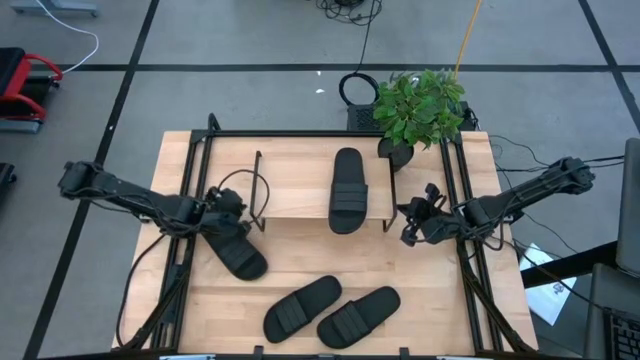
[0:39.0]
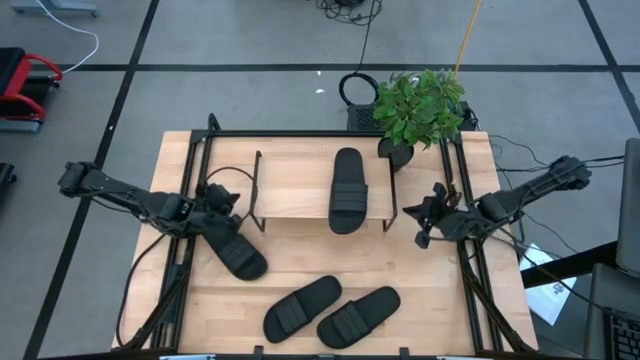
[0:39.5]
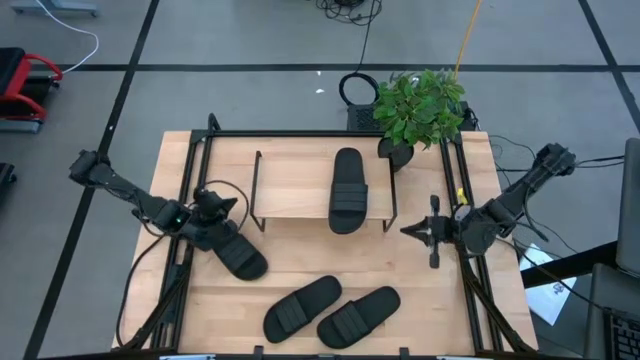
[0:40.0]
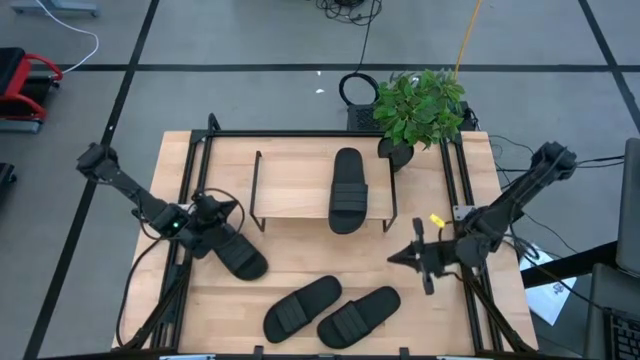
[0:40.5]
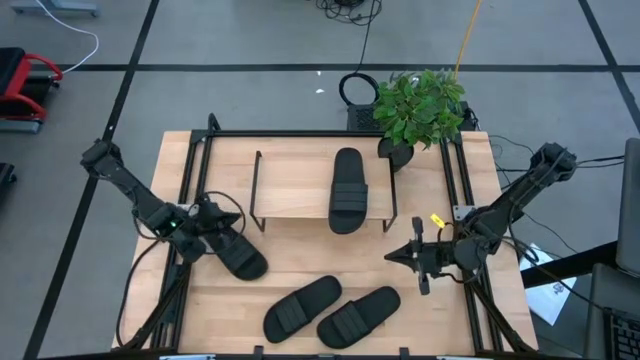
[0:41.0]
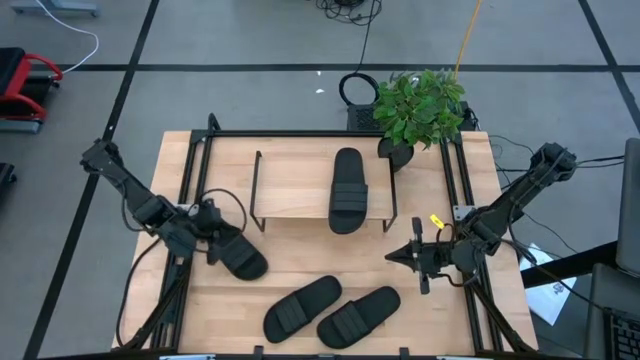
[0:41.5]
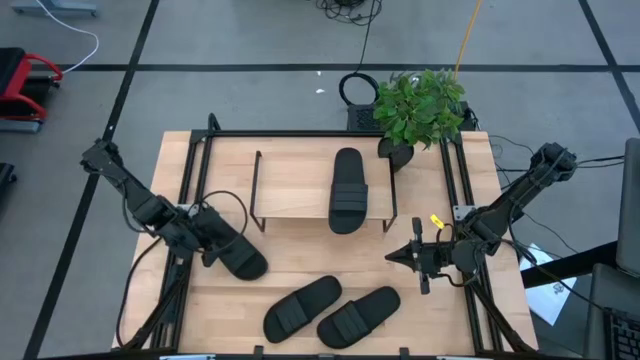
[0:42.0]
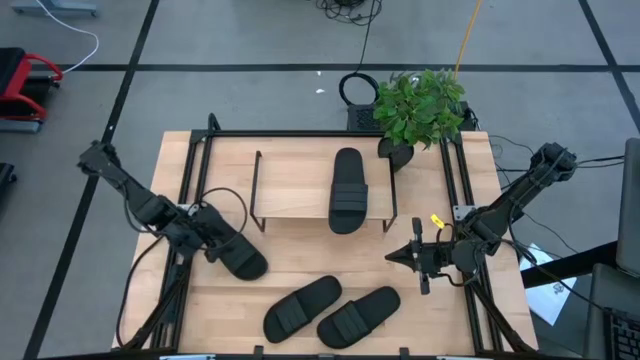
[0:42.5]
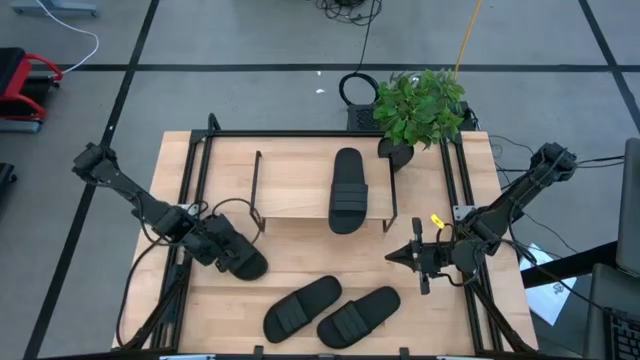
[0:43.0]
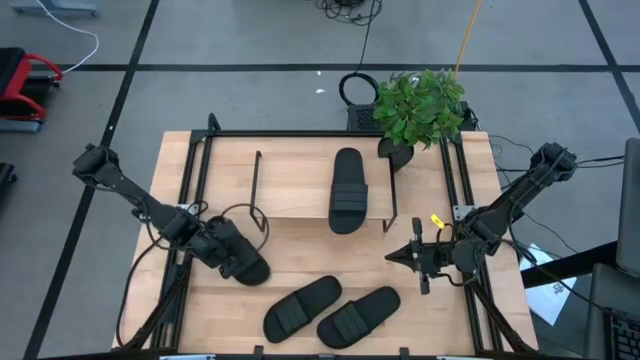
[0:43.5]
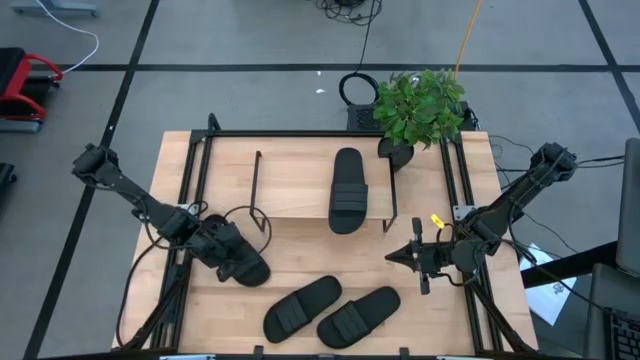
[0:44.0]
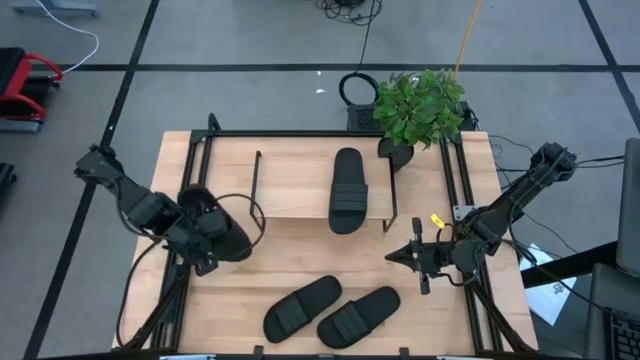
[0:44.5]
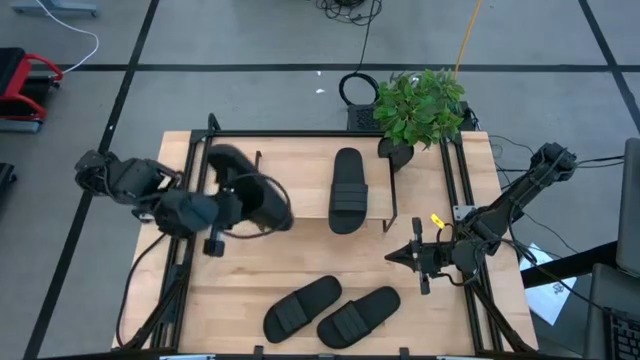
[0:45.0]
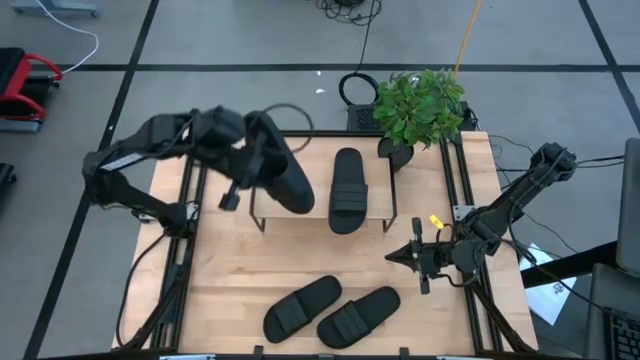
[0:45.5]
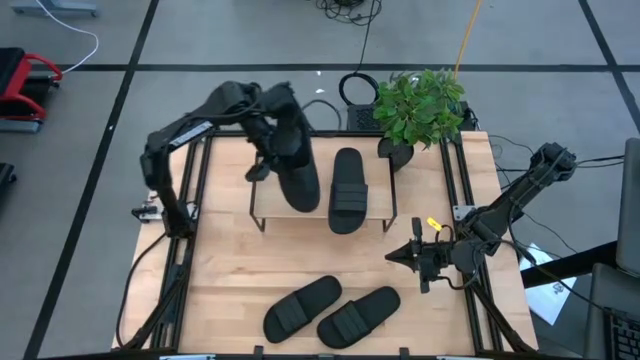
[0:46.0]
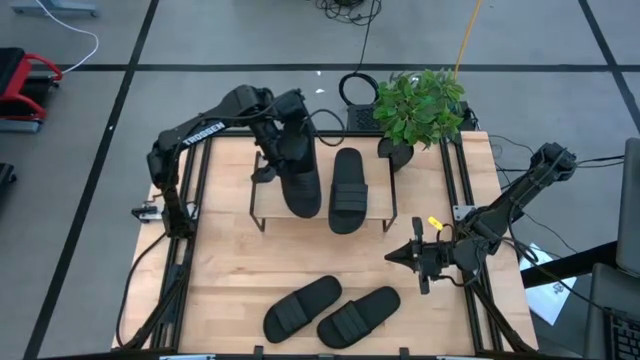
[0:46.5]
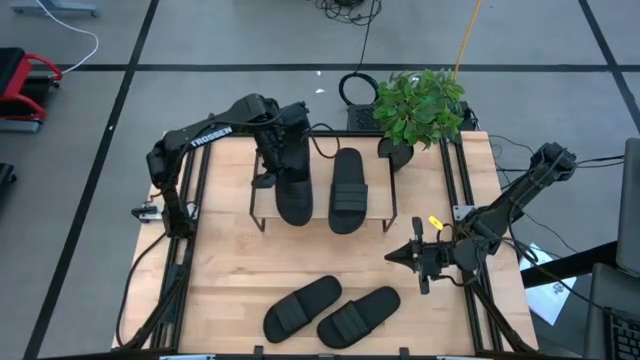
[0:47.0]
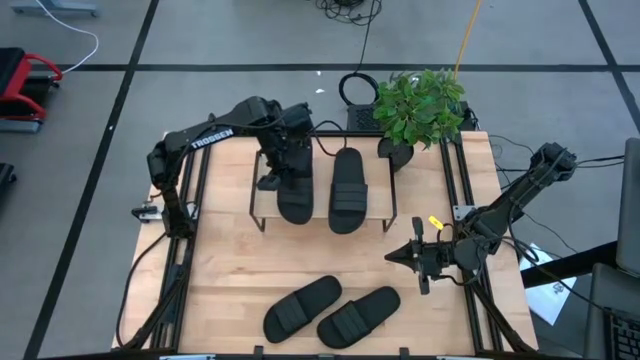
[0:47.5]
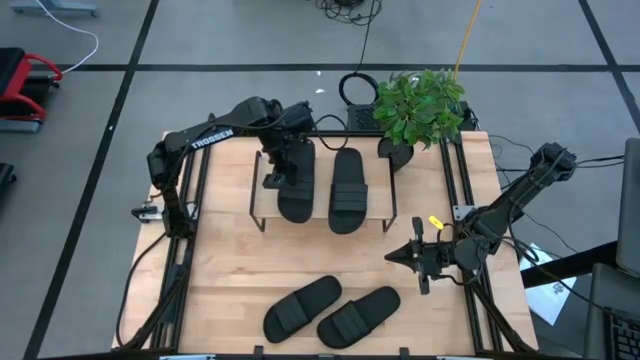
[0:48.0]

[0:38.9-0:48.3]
Task: Pick and place slides into the shelf
Put the black slide on the shelf

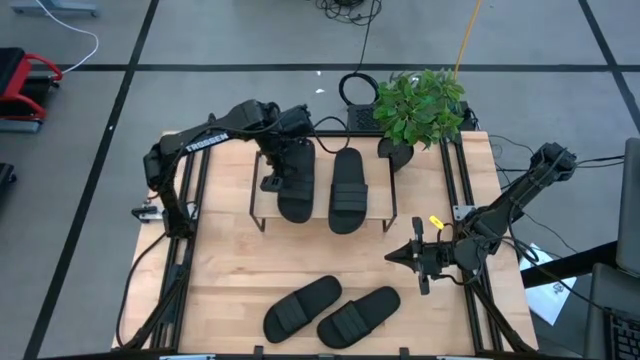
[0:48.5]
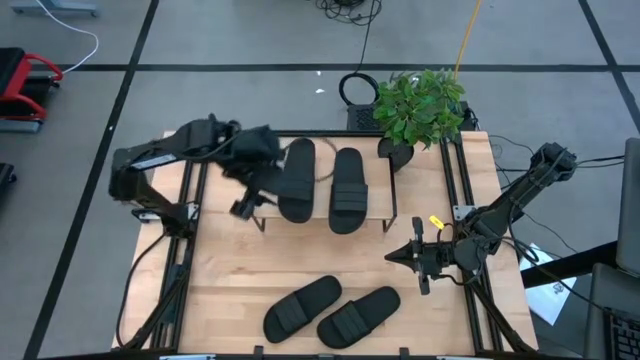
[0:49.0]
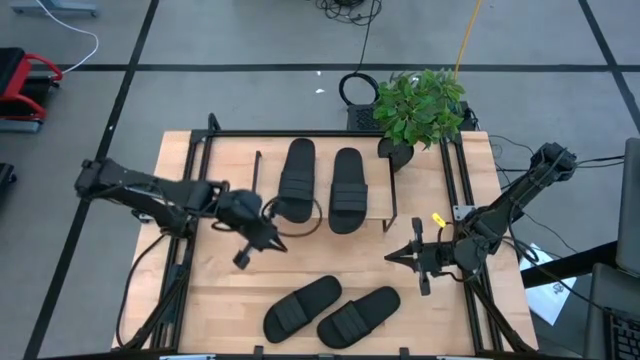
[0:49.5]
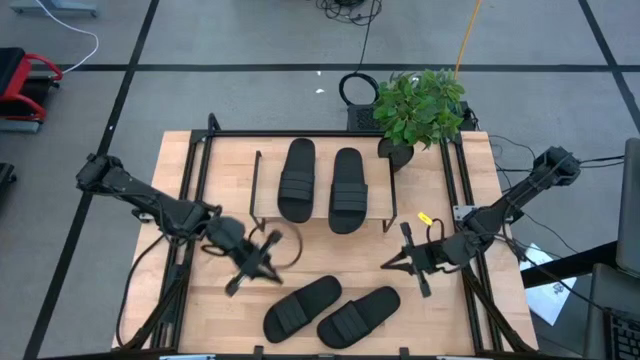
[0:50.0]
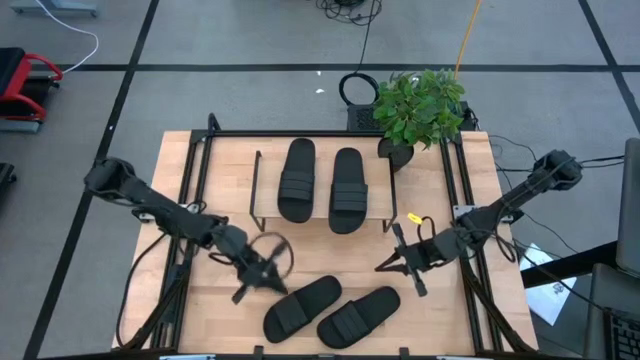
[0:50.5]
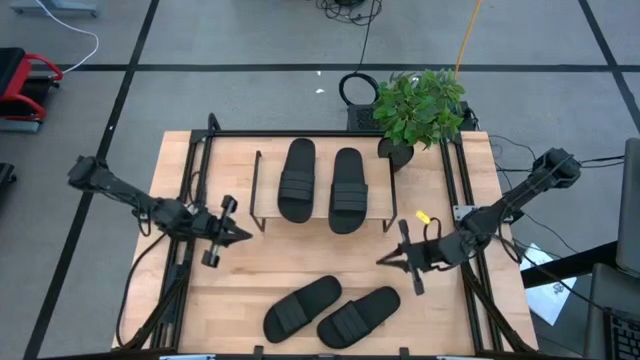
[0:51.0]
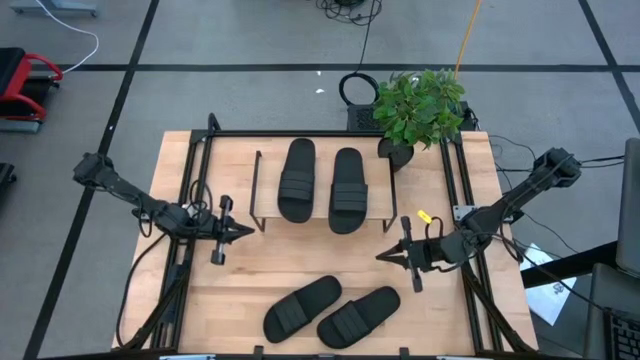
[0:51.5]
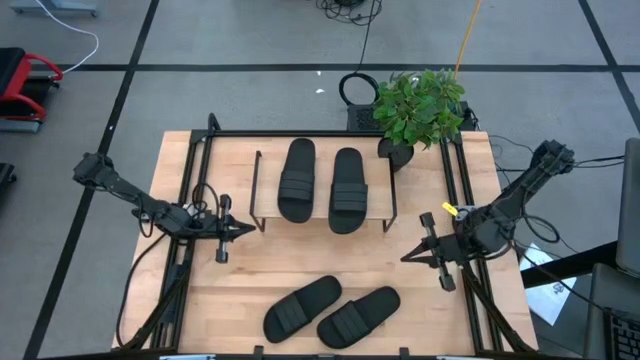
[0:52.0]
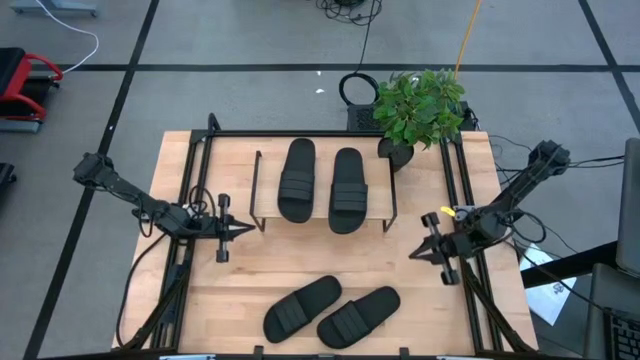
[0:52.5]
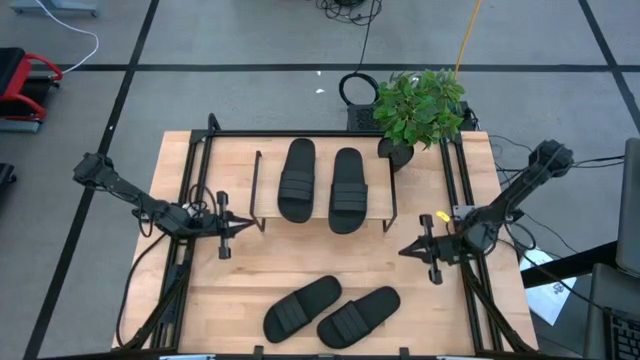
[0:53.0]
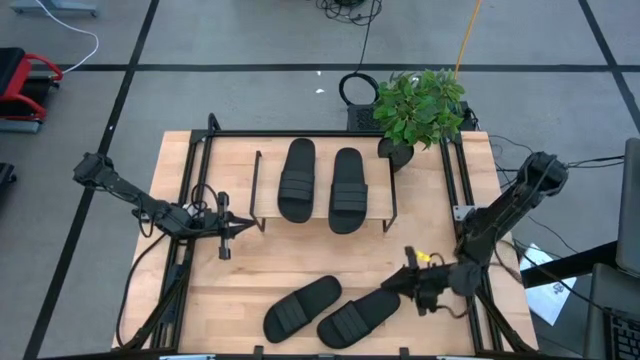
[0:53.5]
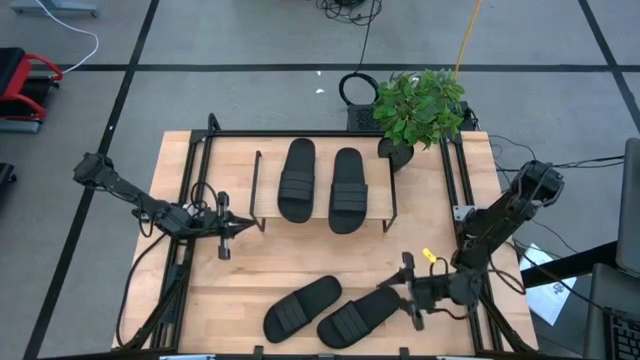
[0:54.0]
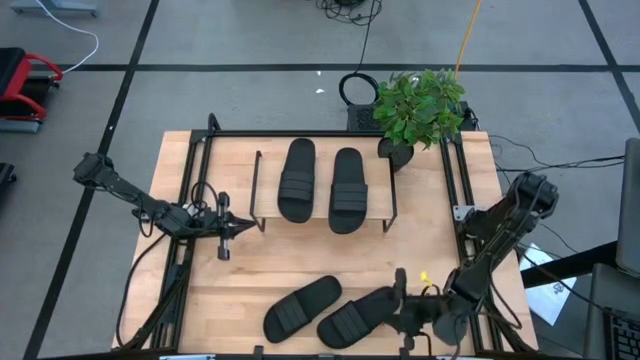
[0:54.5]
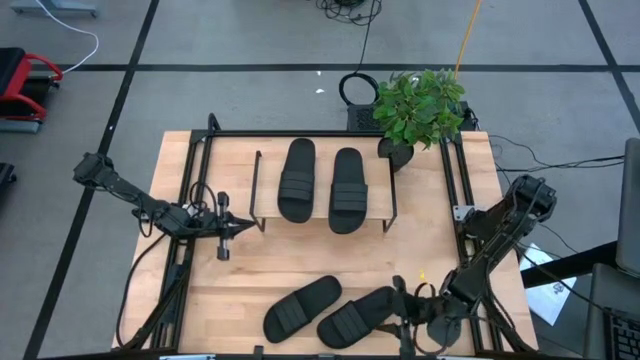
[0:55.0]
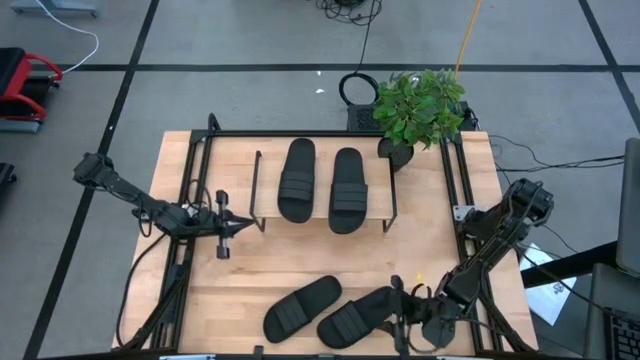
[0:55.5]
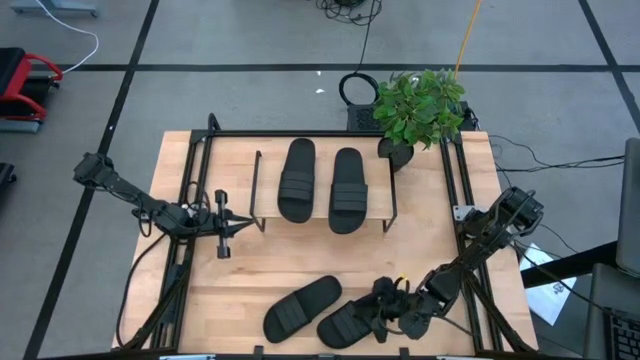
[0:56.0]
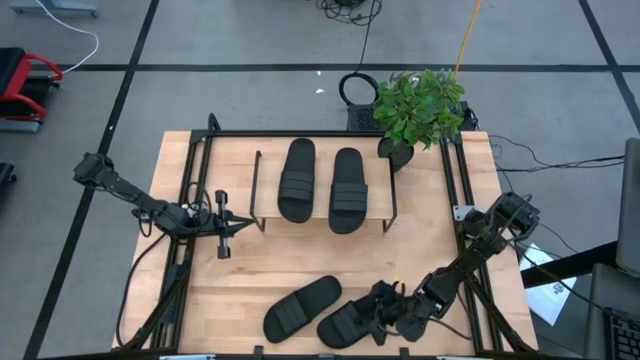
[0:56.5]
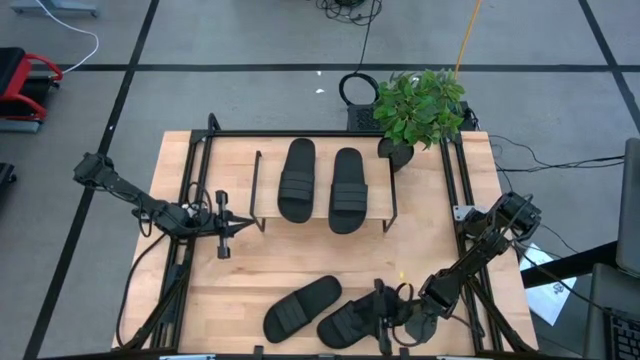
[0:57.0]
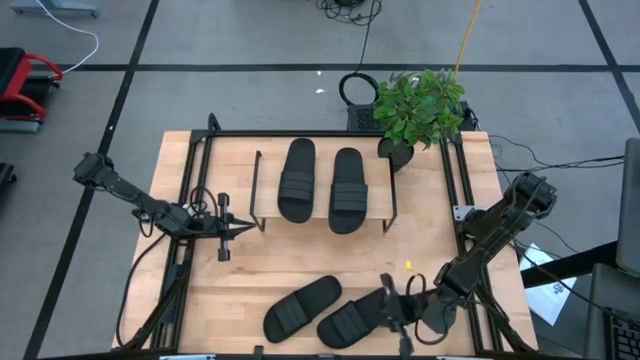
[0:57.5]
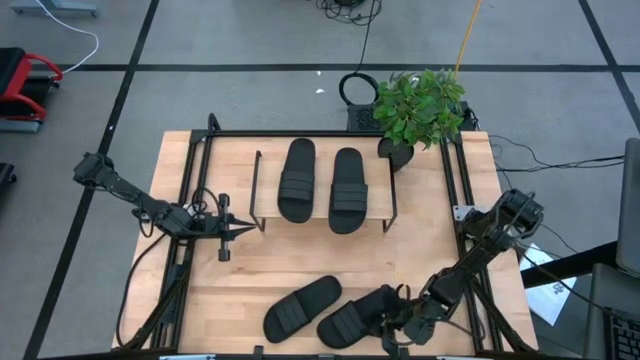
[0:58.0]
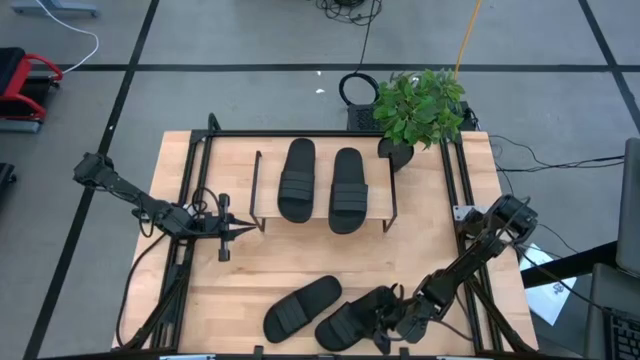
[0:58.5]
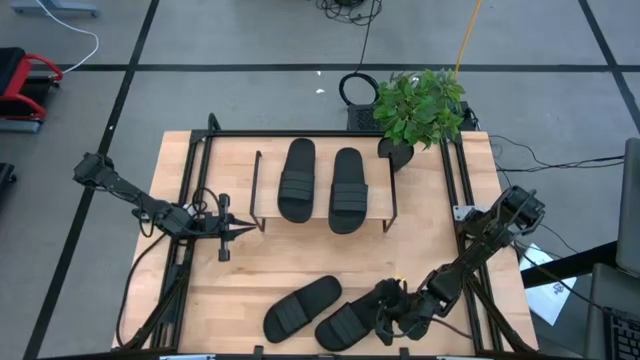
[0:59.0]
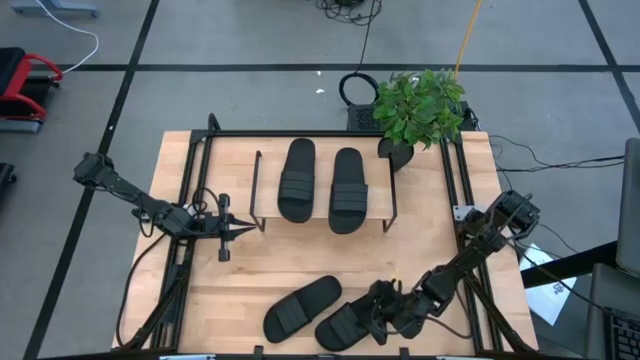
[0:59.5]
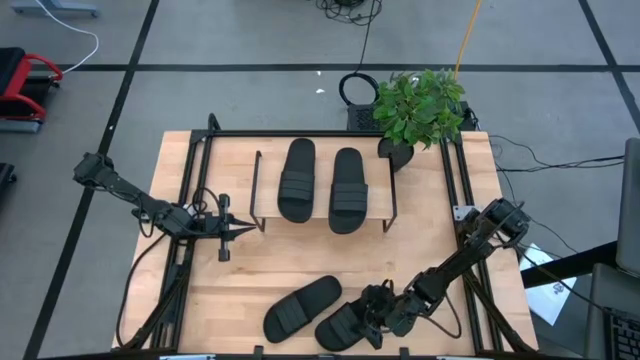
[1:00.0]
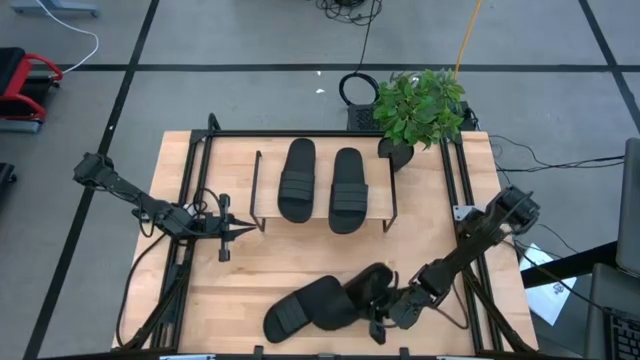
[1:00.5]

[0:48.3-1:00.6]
Put the black slide under the shelf
